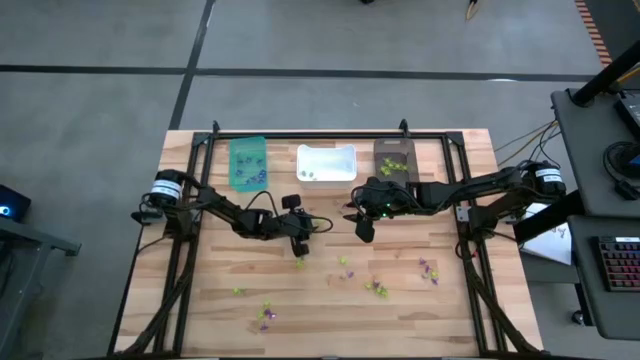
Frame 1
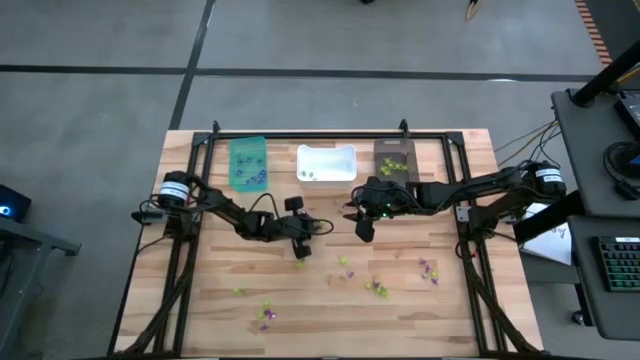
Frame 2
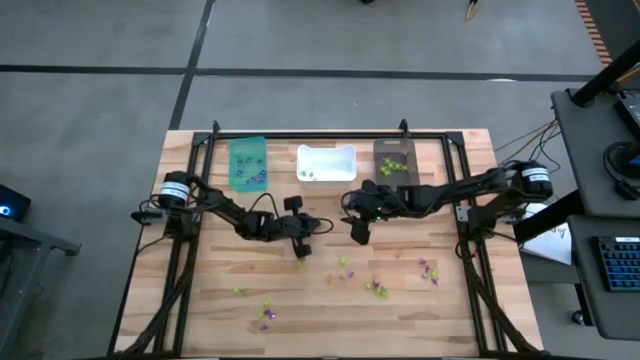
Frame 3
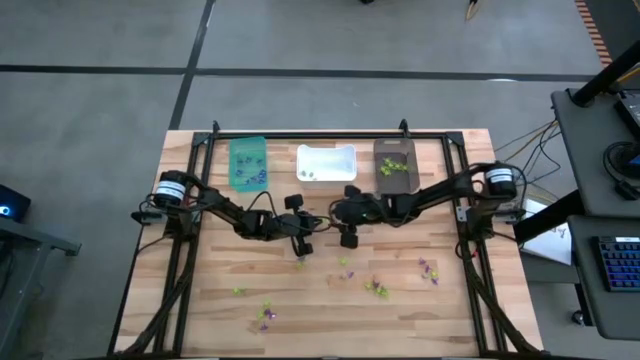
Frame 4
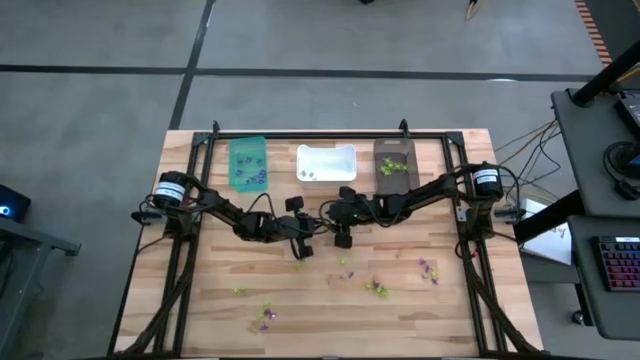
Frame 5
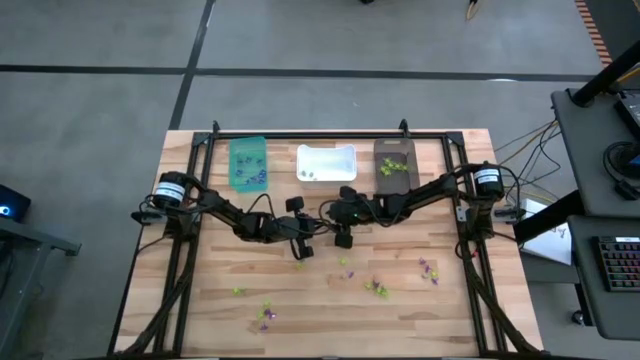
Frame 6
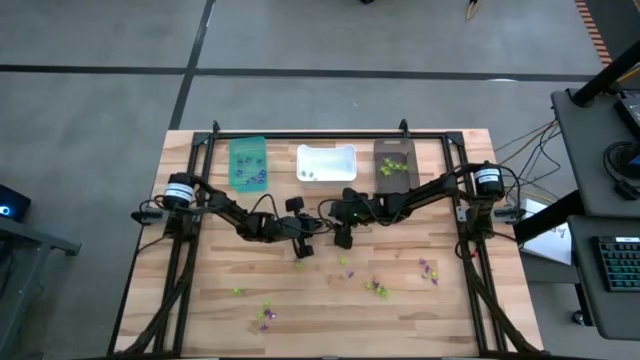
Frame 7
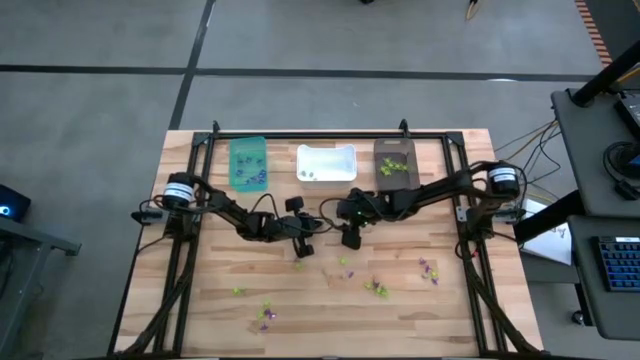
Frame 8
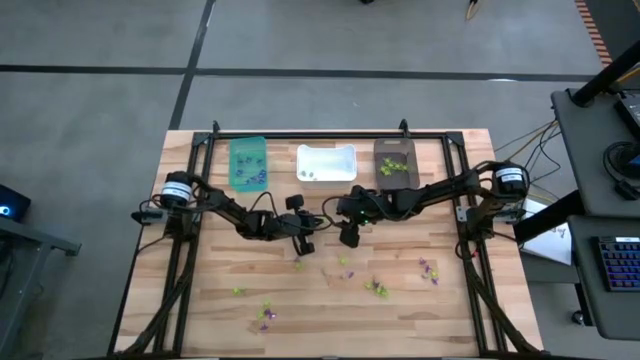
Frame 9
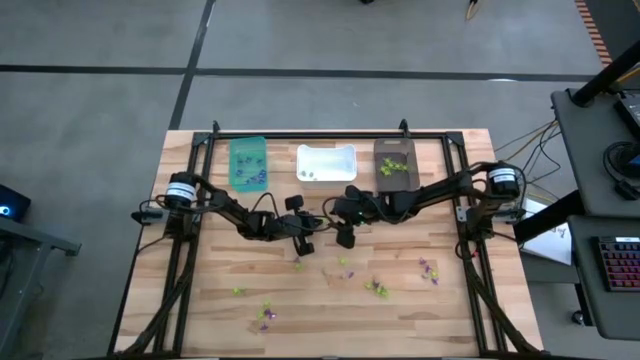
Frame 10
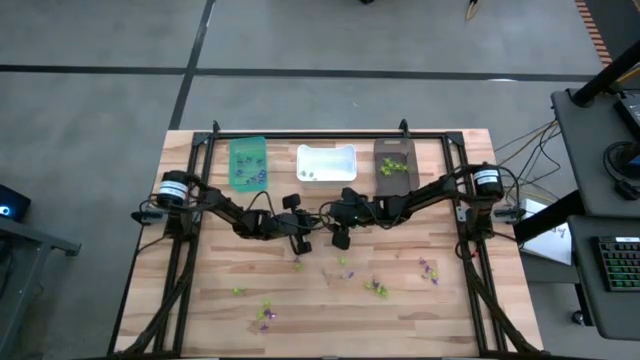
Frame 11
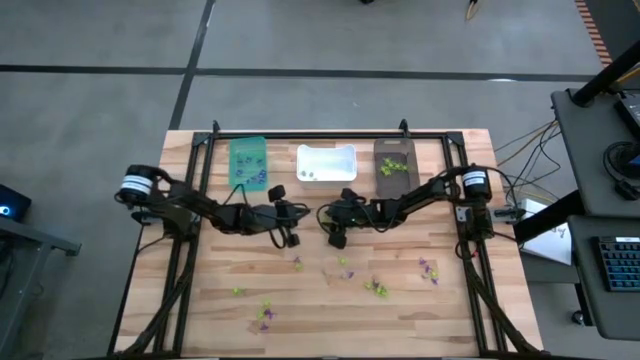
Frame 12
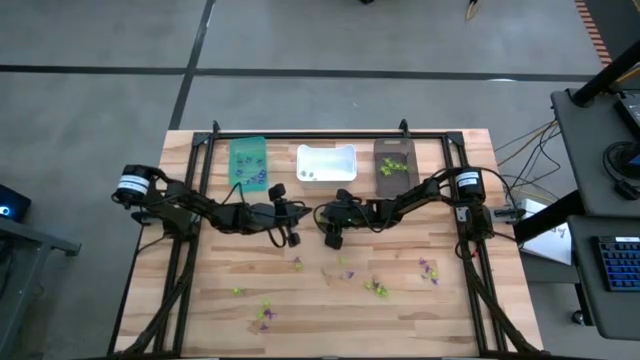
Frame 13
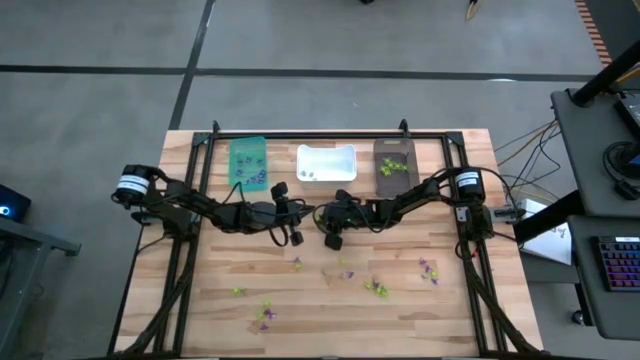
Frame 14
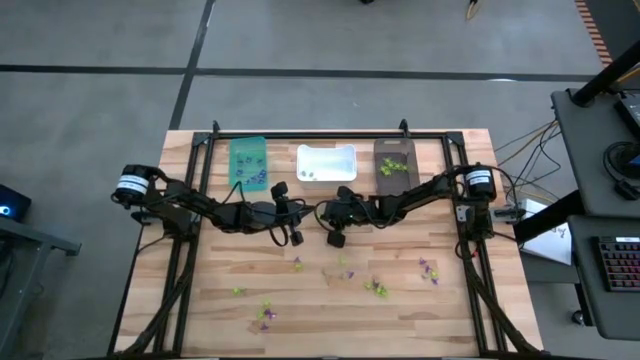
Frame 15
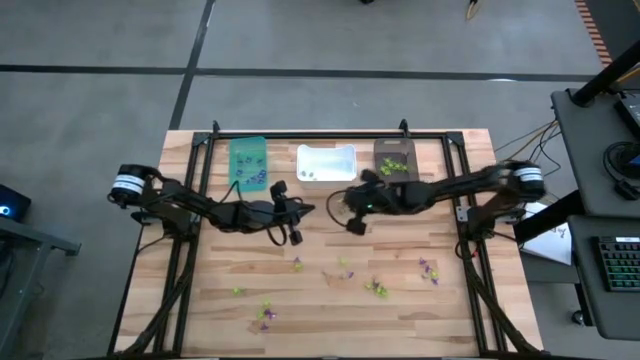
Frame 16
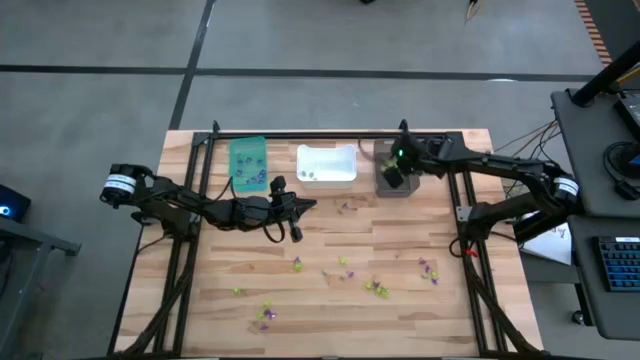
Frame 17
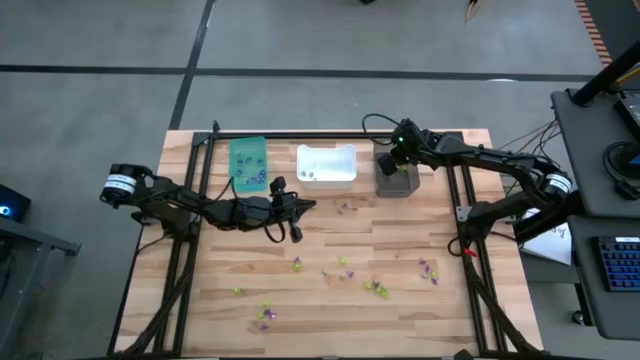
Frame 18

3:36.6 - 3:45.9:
Task: Sort Halloween decoration
Put the green spider toy into the black bin

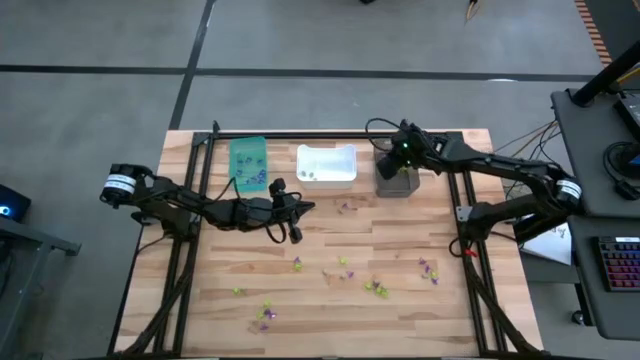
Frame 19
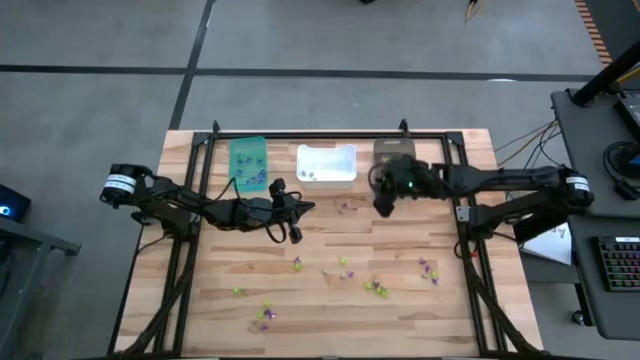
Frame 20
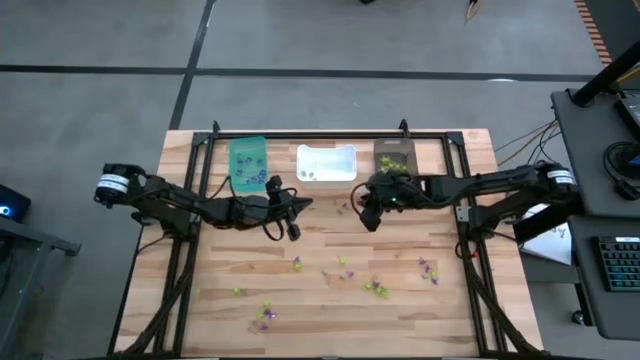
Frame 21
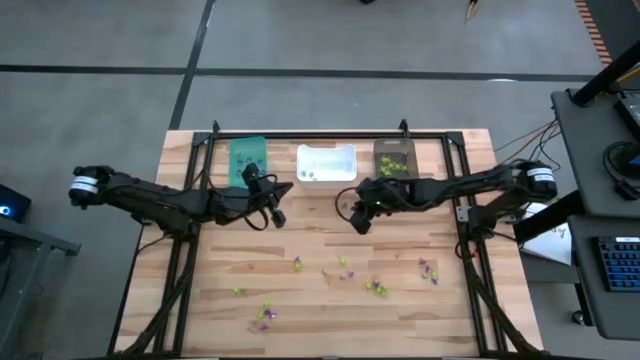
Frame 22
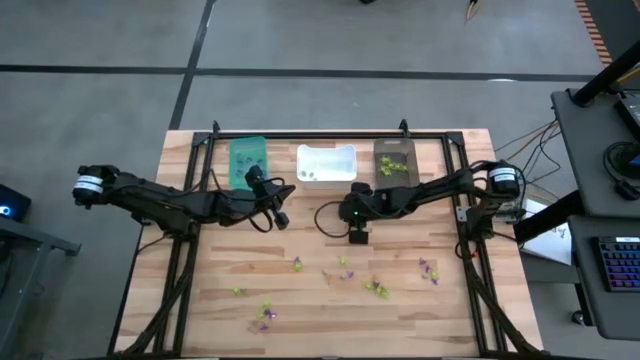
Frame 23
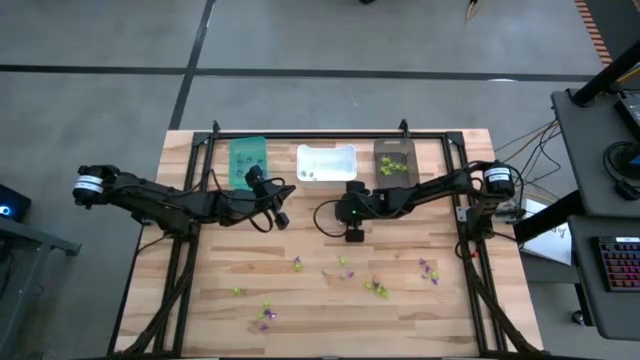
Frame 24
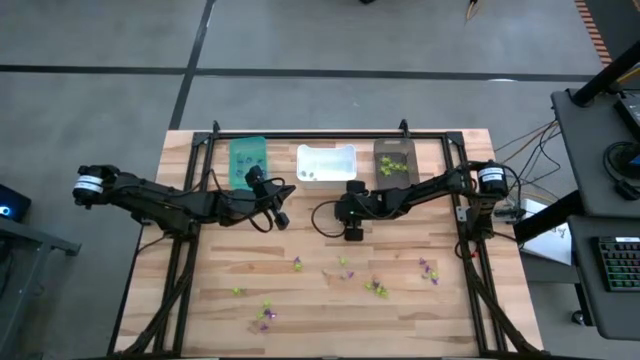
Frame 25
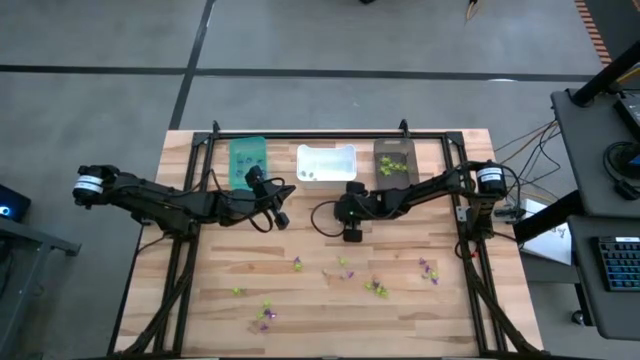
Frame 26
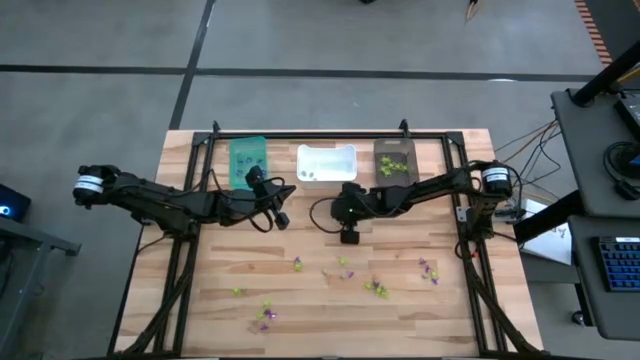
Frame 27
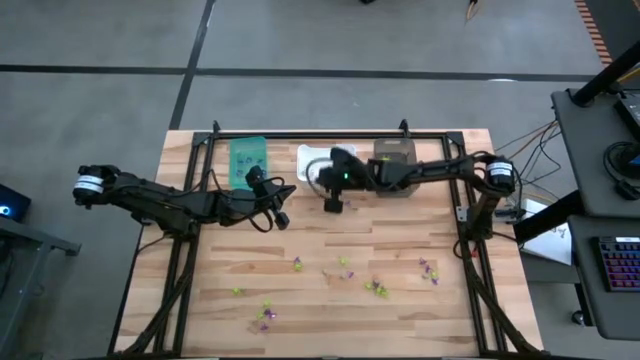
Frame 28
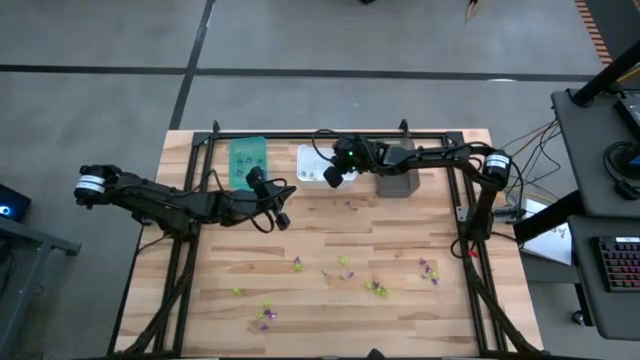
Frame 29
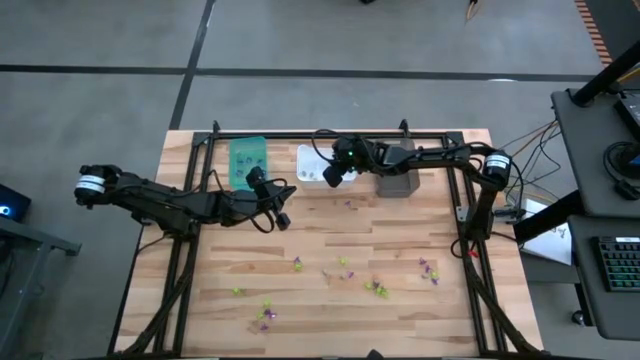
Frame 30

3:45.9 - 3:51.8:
Put the white skull toy into the white bin

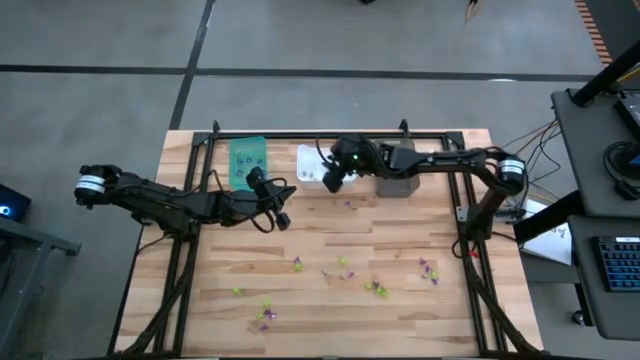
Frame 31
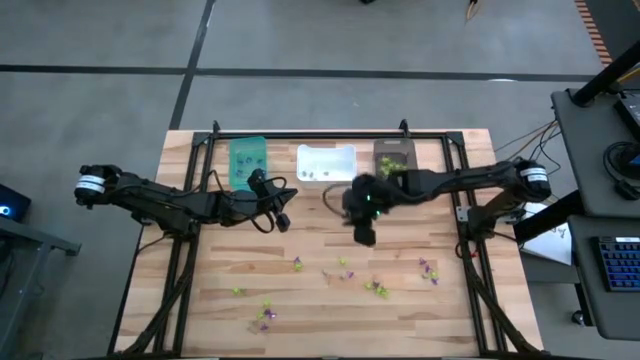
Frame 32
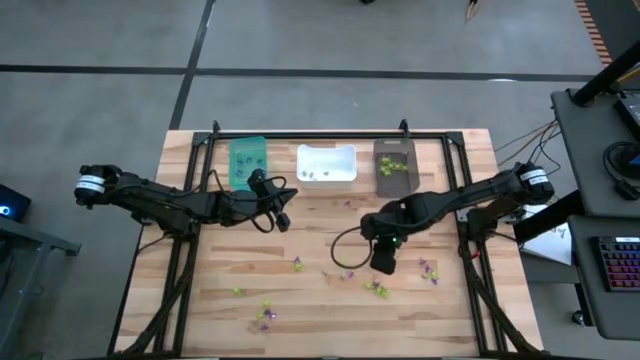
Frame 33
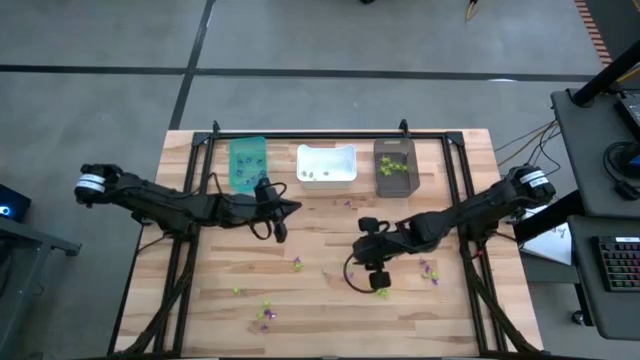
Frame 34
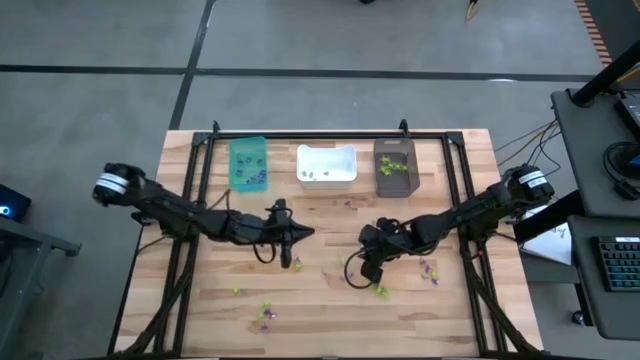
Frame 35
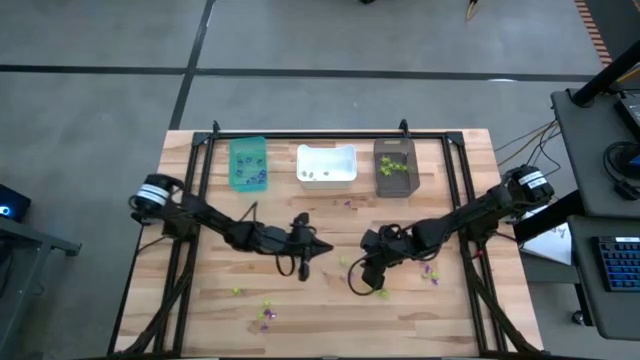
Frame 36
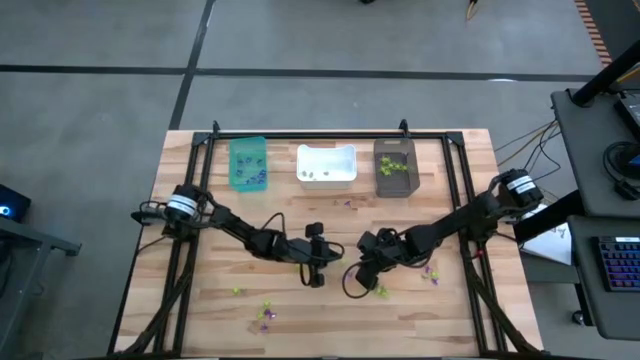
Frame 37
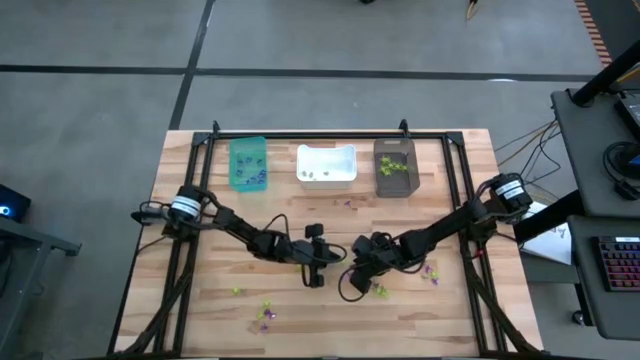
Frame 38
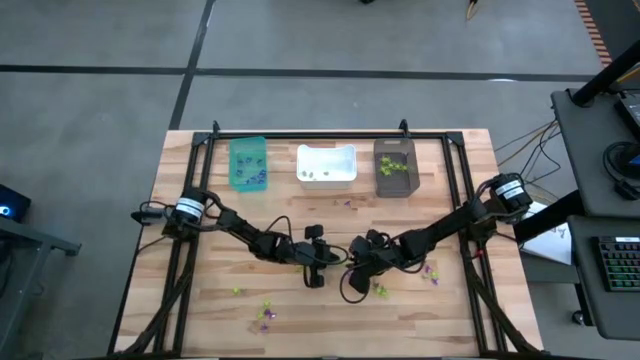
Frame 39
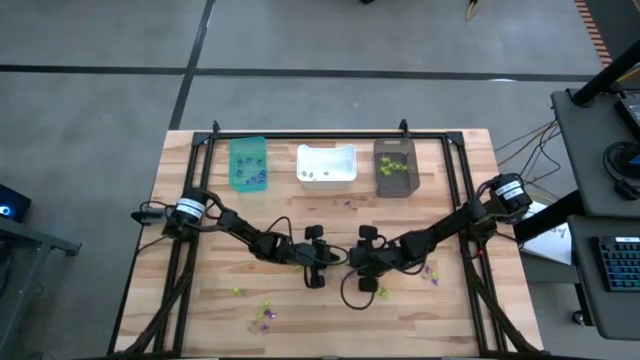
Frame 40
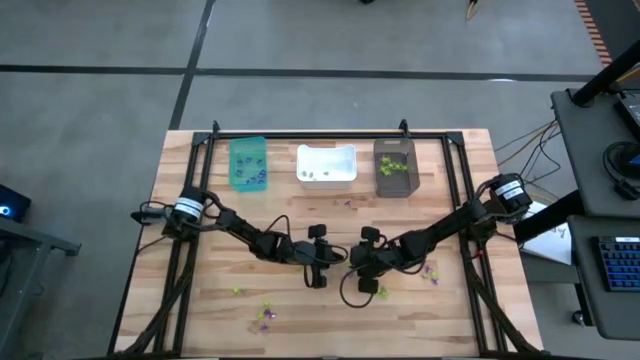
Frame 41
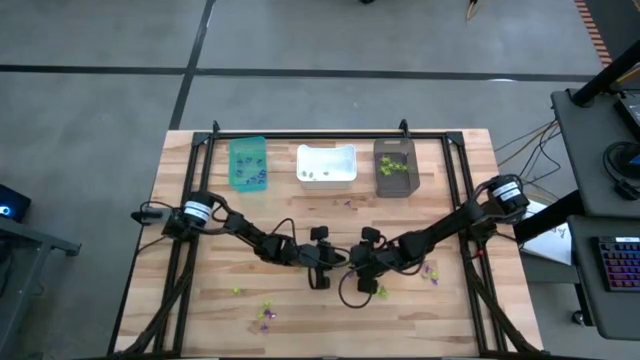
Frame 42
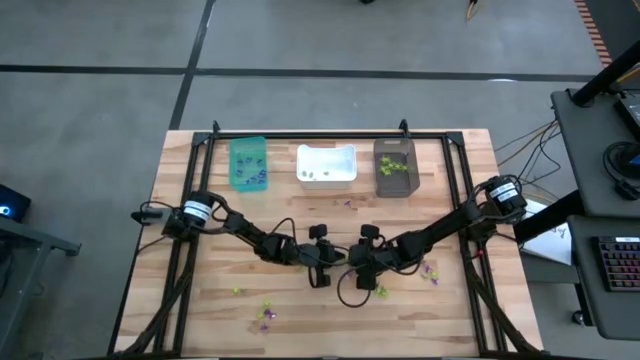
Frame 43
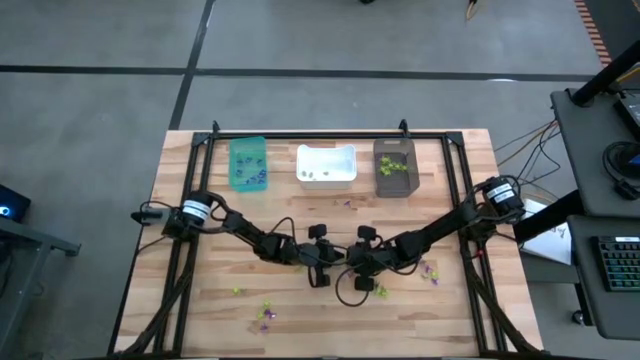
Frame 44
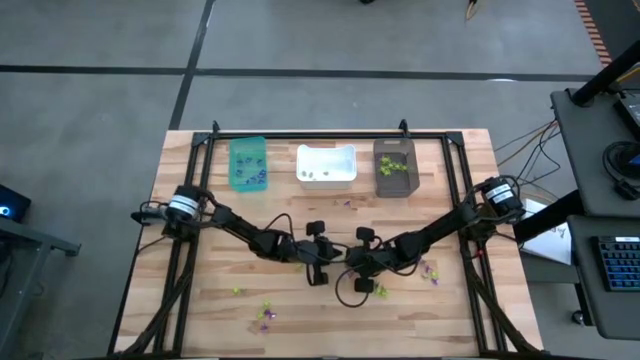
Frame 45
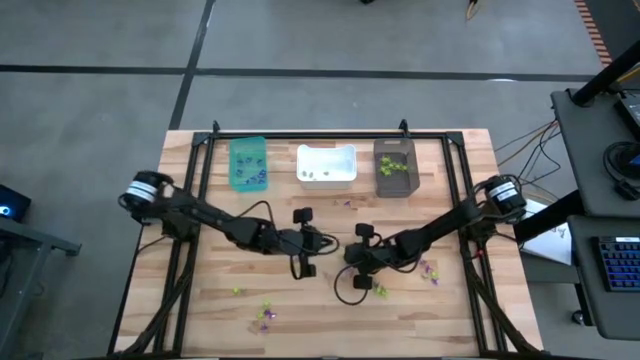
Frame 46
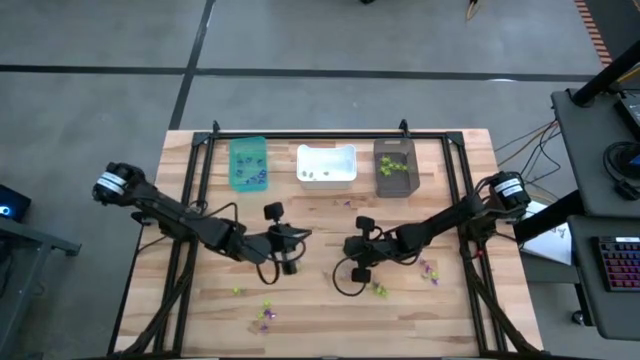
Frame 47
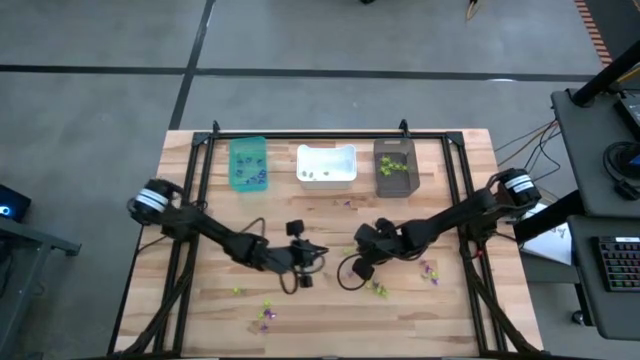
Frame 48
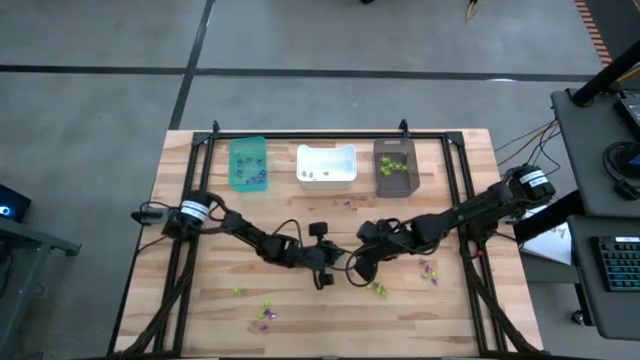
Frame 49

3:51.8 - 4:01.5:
Put the green spider toy into the black bin
